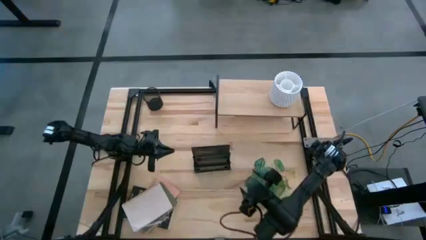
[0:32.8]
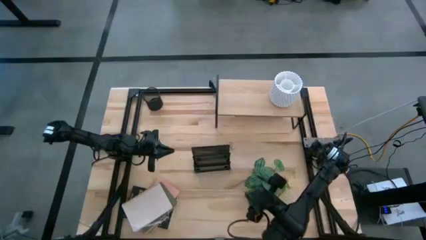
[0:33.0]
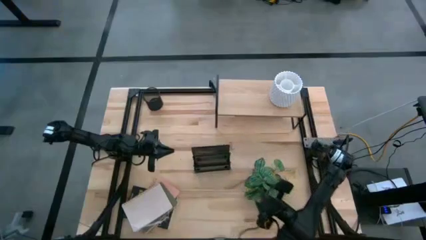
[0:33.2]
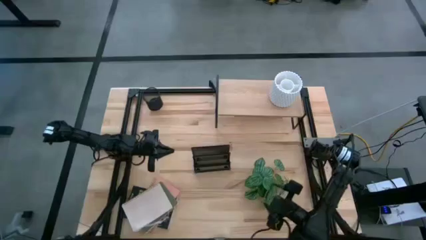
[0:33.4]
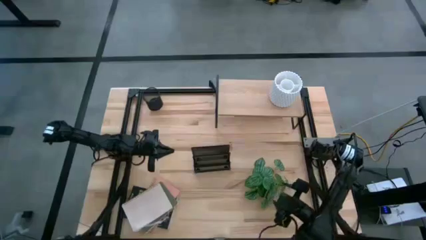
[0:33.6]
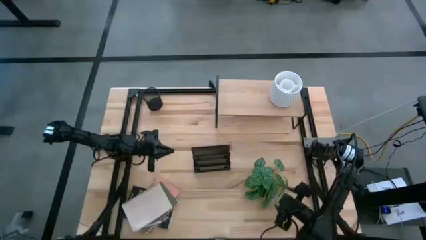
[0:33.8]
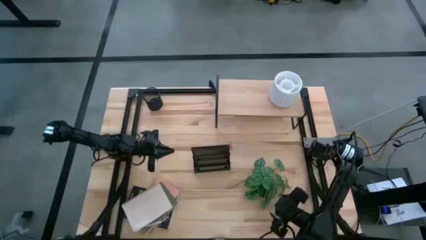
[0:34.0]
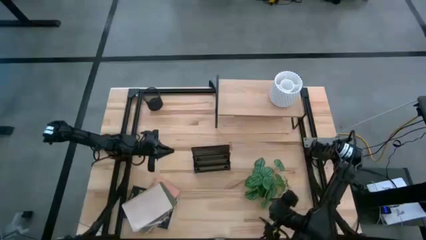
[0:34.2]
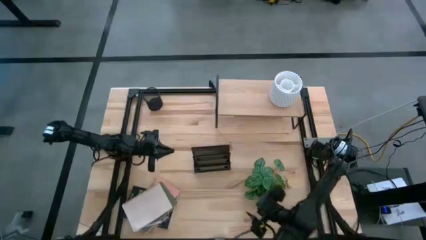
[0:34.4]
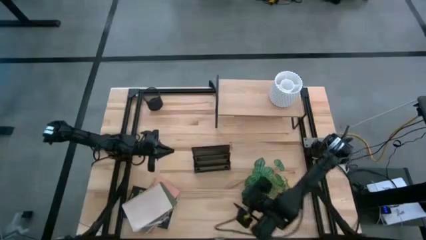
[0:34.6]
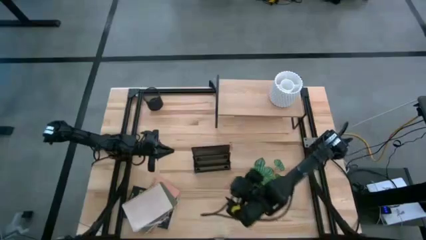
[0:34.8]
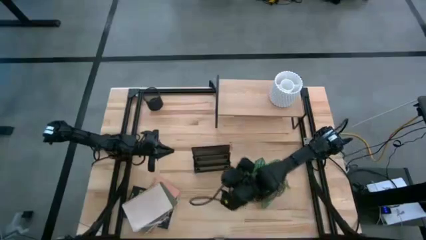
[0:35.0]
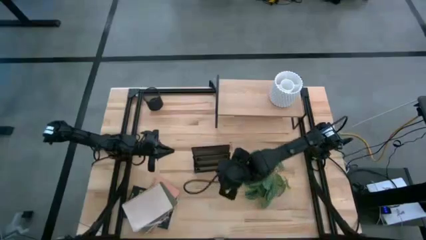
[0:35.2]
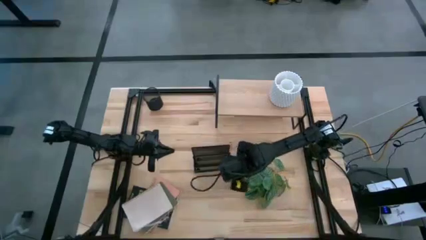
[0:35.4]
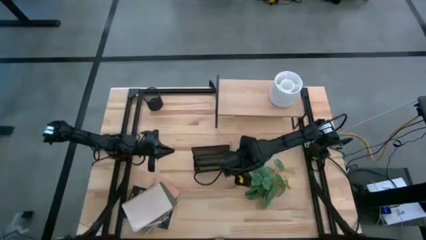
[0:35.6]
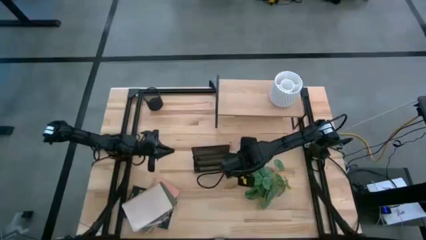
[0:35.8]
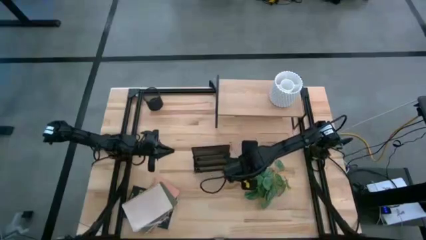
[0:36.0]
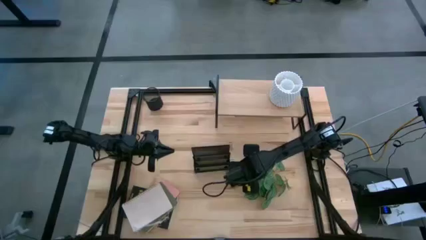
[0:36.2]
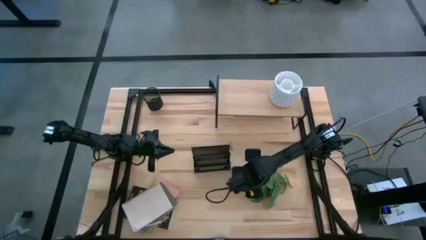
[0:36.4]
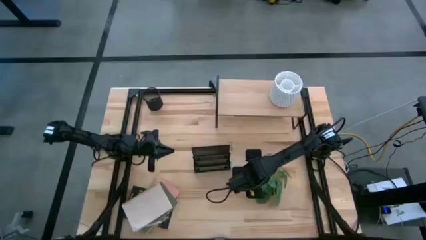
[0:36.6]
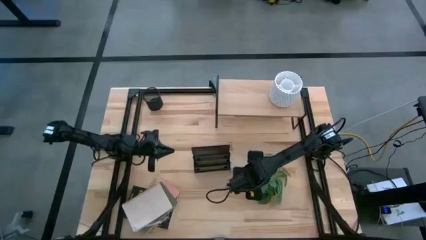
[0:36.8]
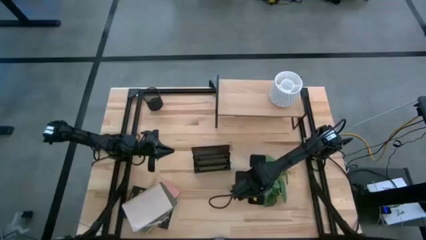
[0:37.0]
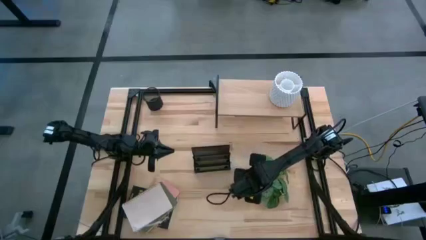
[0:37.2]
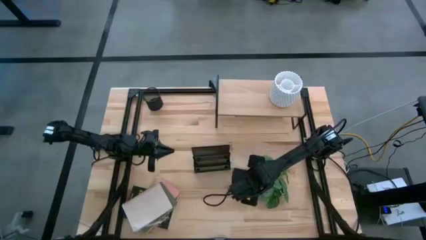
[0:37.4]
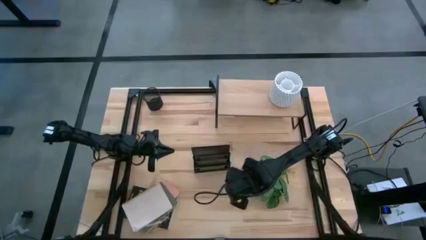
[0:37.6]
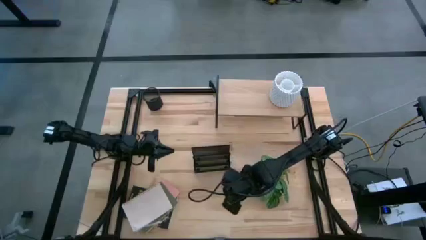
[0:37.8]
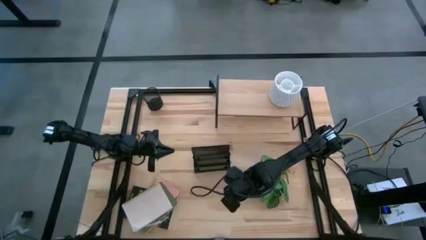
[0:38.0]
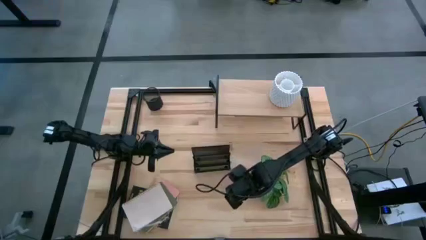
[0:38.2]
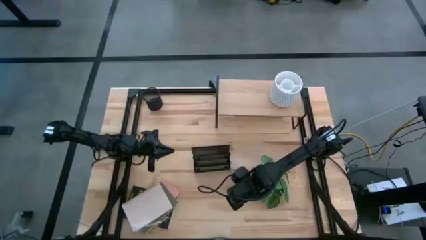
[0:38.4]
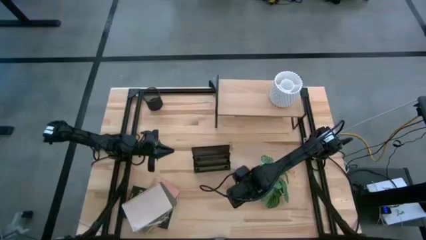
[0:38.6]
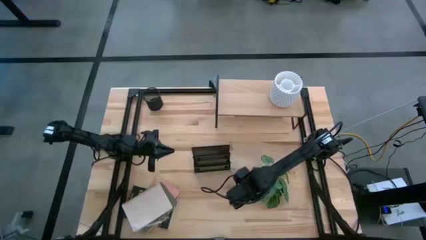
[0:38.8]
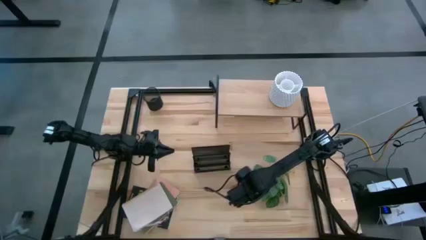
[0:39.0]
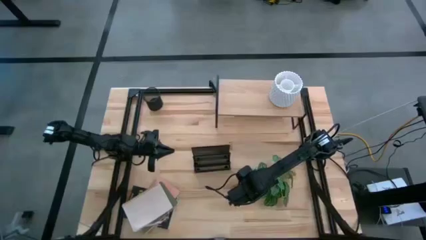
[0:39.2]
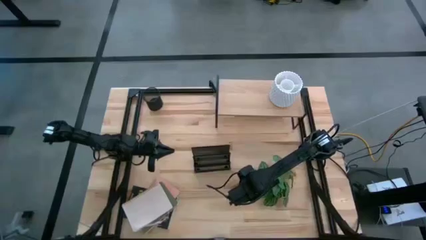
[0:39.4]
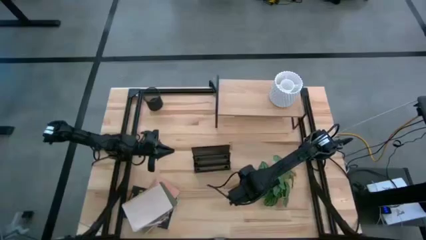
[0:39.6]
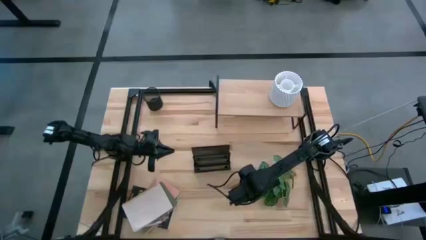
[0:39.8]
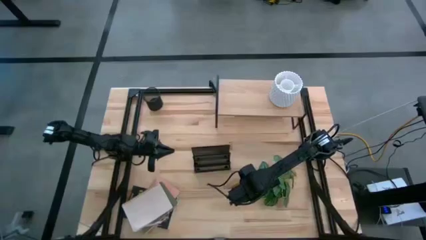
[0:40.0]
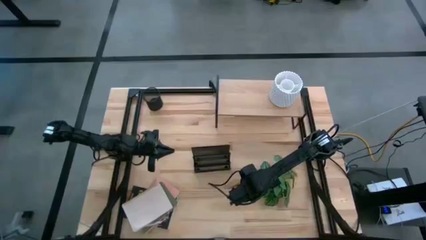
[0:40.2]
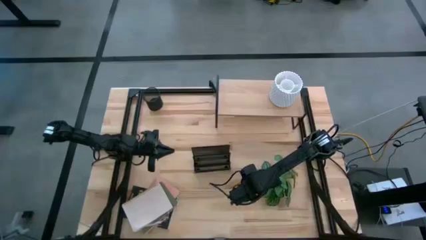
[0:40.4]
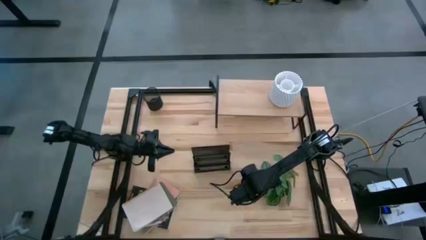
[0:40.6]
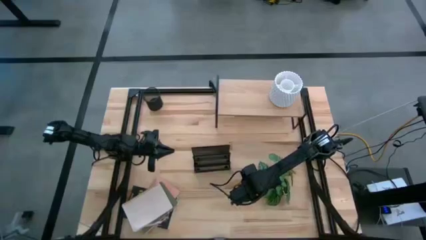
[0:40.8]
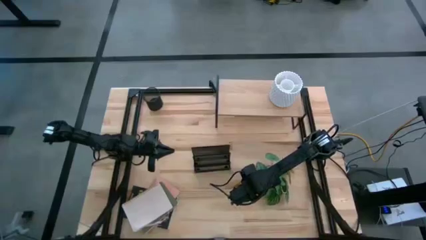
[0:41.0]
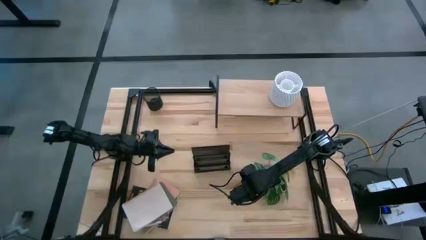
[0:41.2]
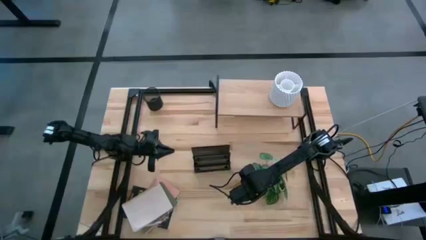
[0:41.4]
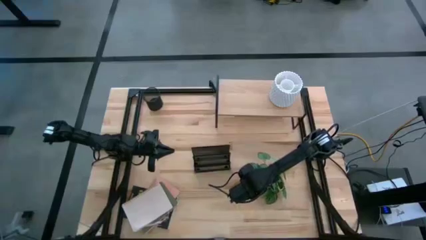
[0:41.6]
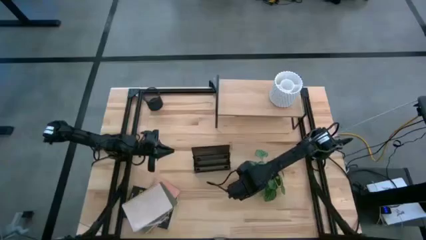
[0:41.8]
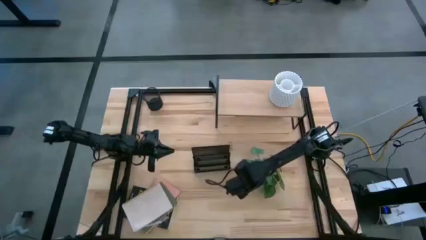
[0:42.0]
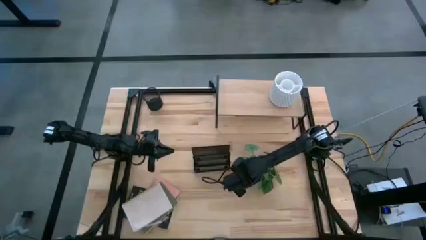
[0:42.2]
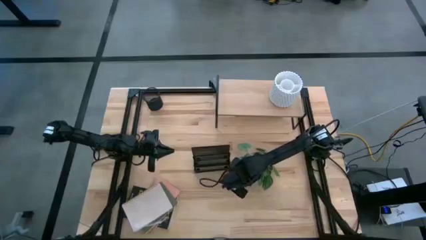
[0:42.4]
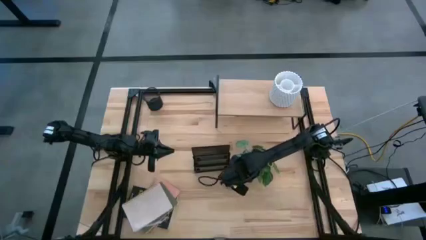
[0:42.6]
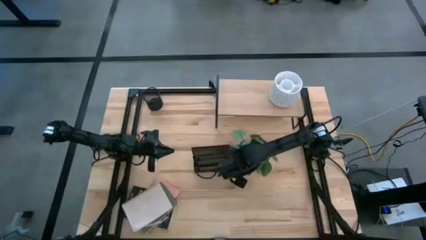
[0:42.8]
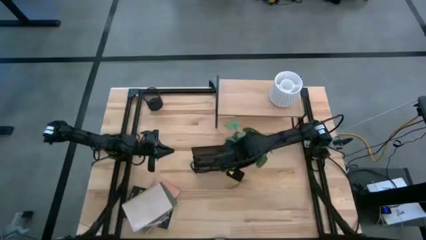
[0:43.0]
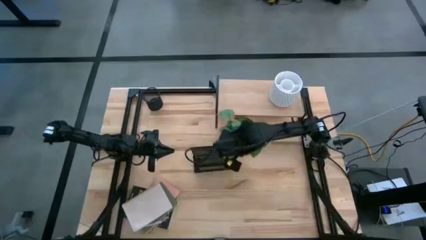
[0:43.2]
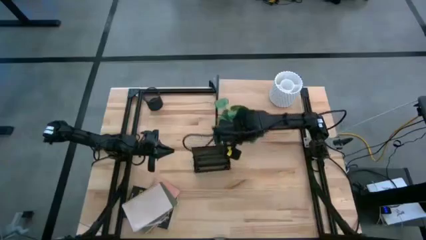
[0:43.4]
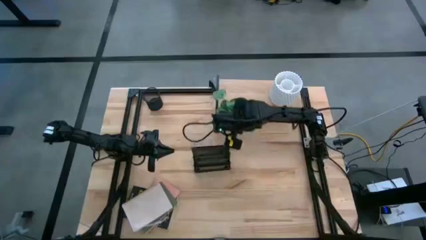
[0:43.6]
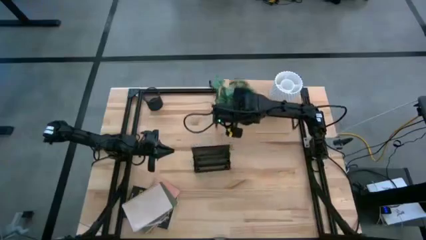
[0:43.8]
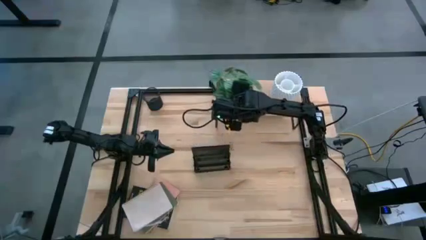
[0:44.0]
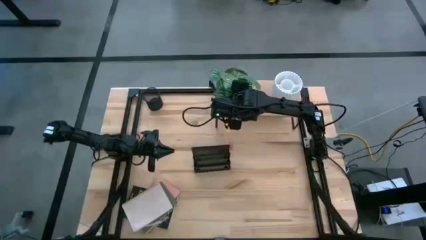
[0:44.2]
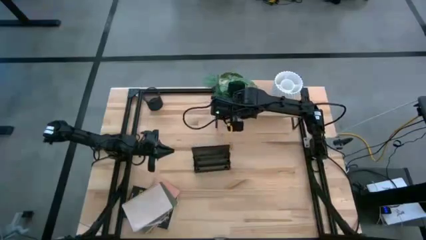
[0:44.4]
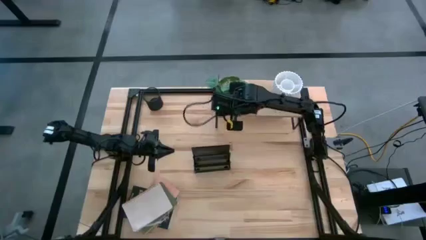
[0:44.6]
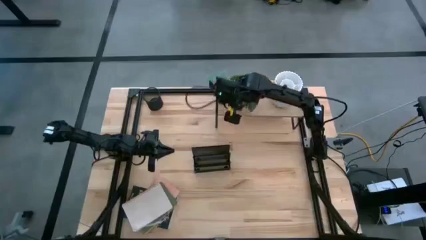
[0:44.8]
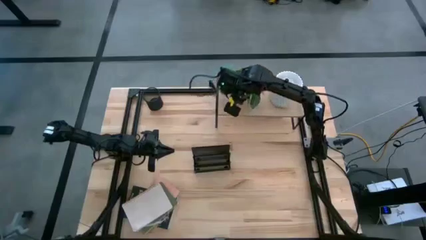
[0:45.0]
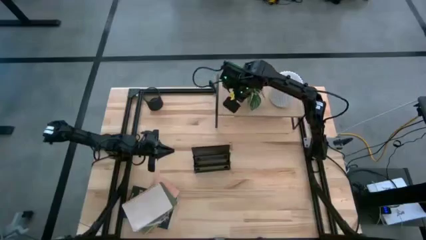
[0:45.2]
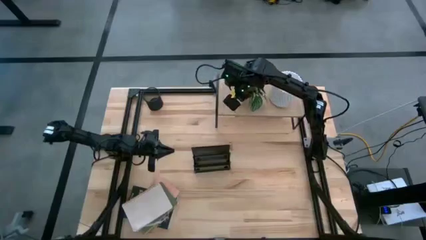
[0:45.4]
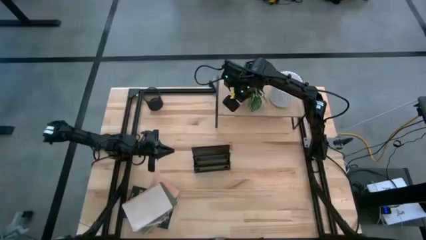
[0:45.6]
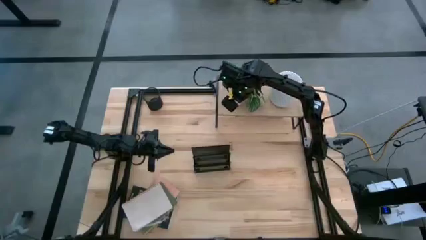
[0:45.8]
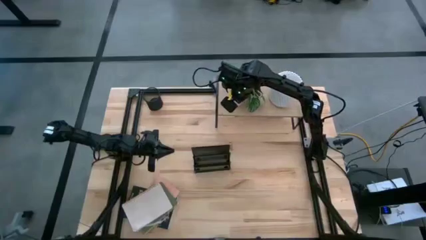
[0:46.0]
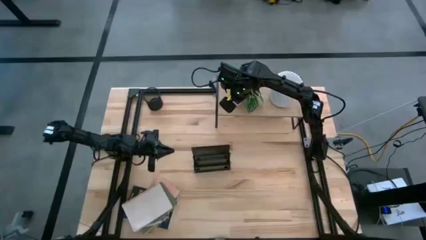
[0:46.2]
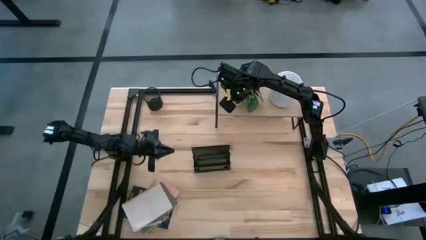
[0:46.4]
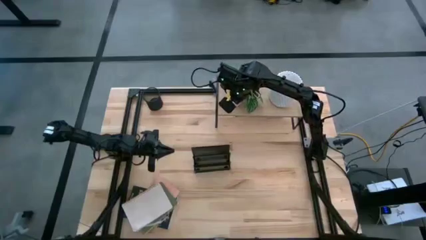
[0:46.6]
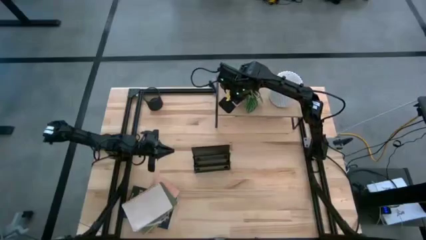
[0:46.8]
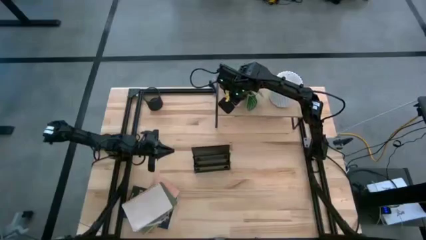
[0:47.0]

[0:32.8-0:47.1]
Task: Stock shelves
Put the white potted plant on the shelf
